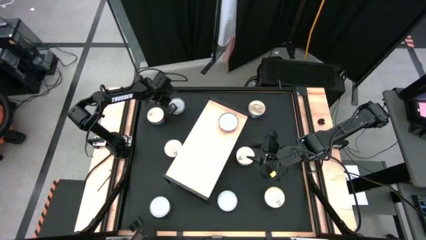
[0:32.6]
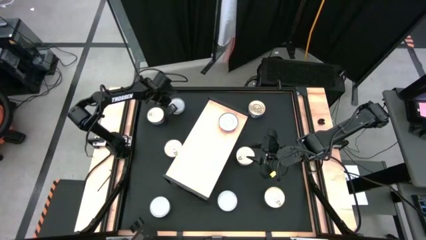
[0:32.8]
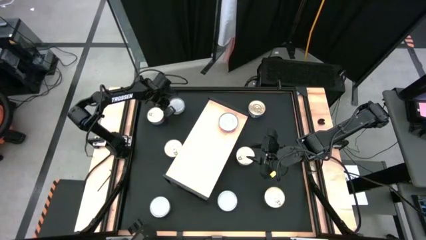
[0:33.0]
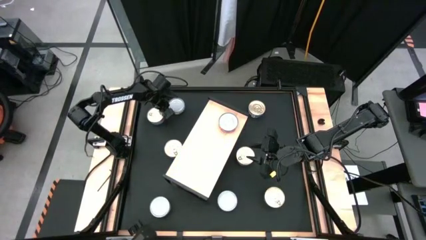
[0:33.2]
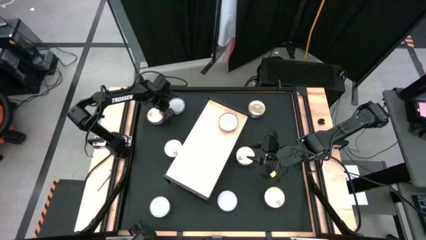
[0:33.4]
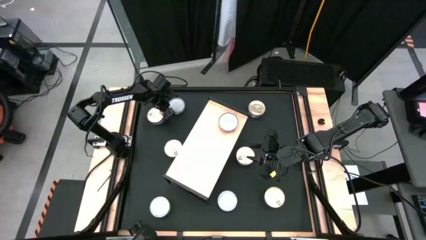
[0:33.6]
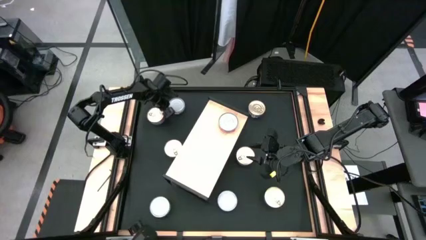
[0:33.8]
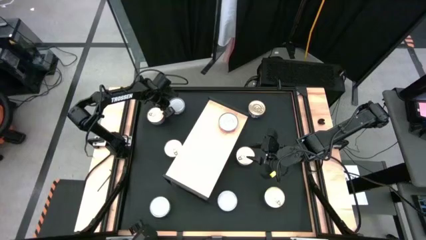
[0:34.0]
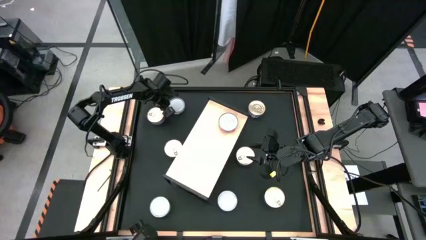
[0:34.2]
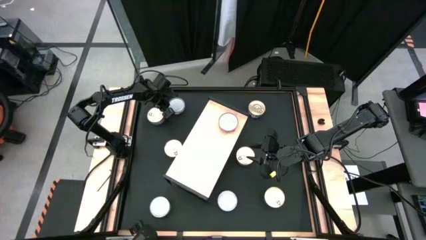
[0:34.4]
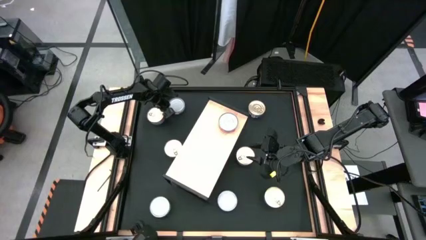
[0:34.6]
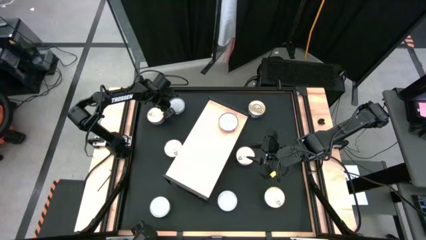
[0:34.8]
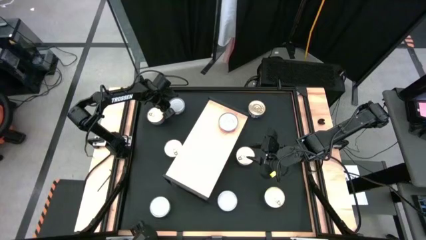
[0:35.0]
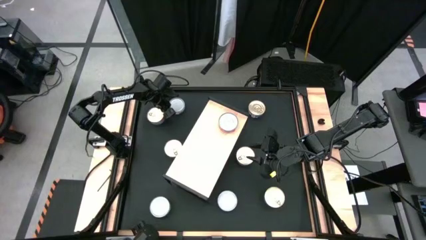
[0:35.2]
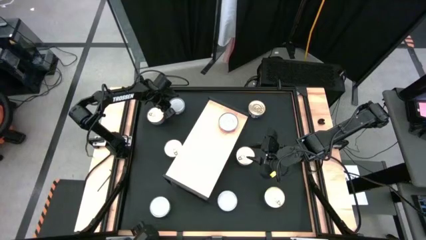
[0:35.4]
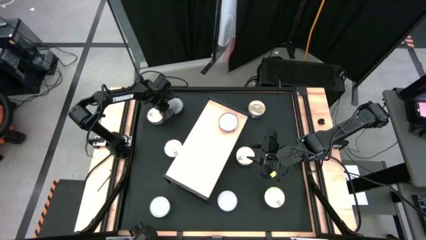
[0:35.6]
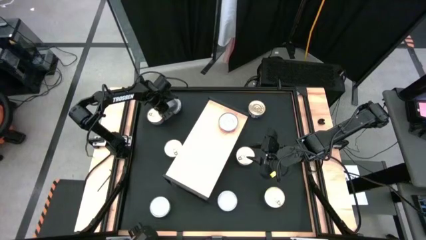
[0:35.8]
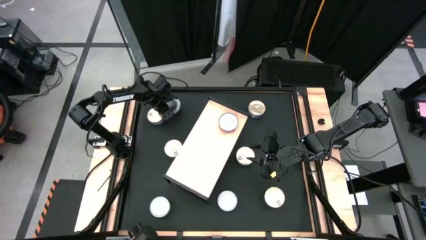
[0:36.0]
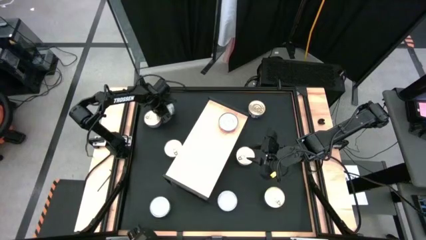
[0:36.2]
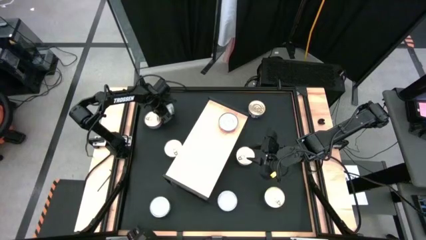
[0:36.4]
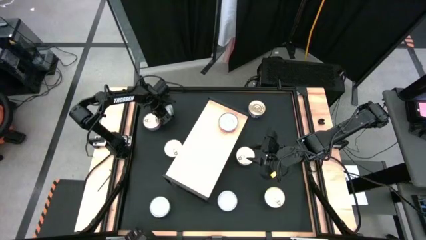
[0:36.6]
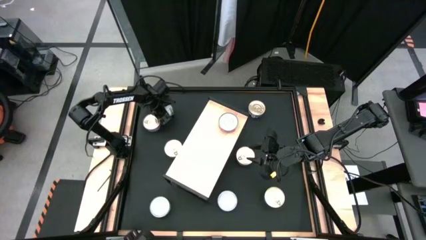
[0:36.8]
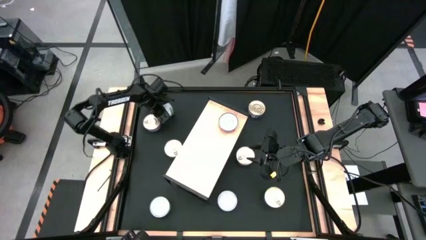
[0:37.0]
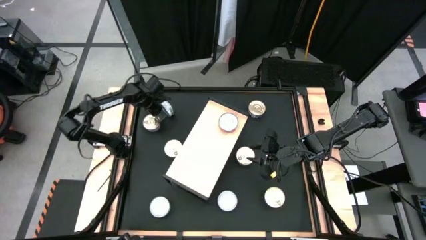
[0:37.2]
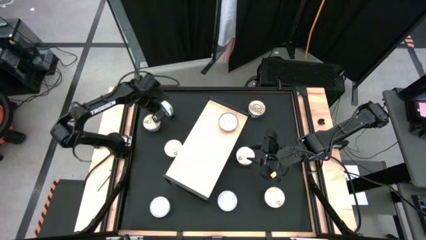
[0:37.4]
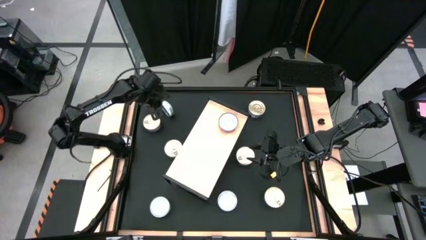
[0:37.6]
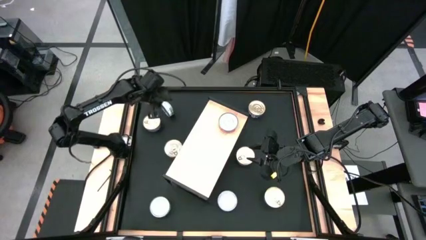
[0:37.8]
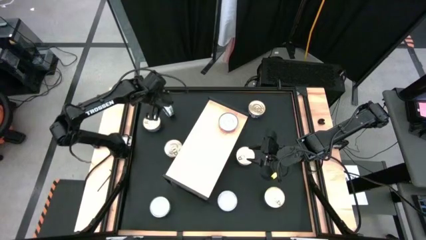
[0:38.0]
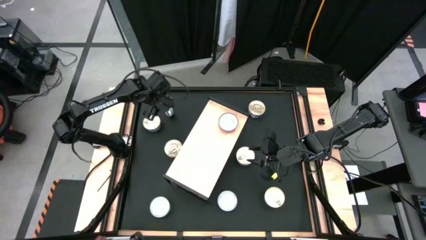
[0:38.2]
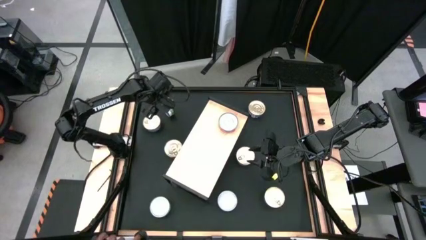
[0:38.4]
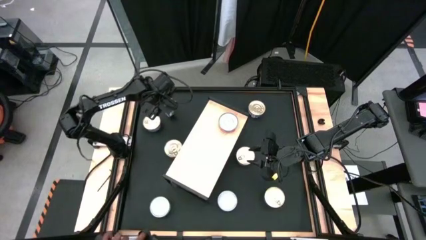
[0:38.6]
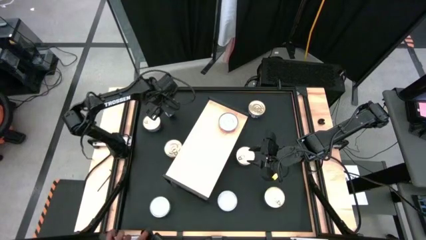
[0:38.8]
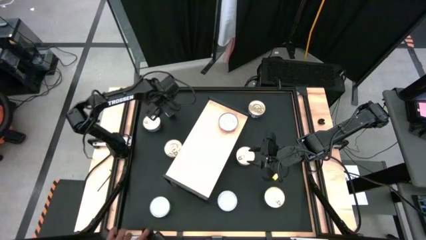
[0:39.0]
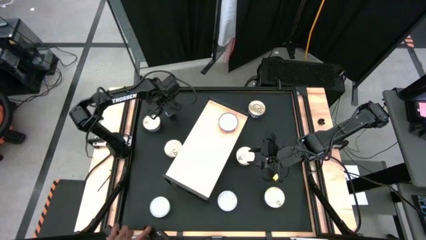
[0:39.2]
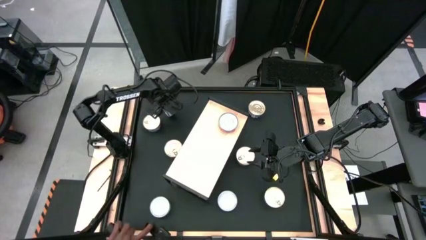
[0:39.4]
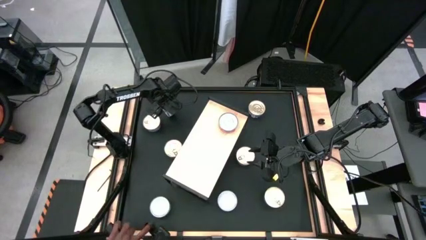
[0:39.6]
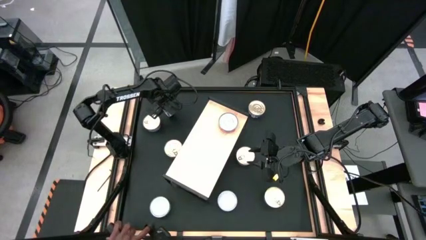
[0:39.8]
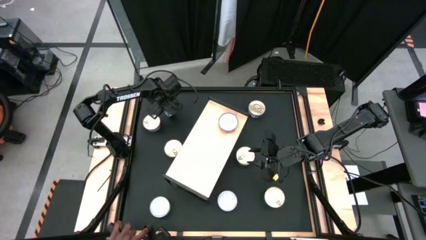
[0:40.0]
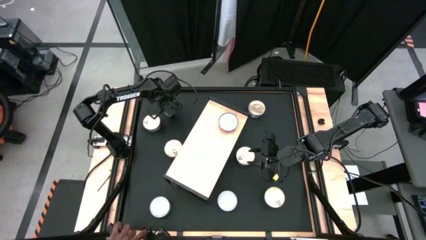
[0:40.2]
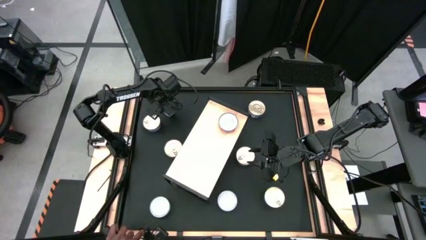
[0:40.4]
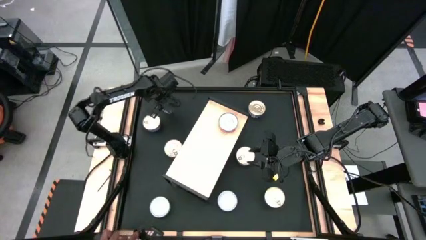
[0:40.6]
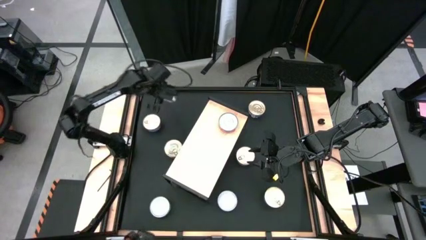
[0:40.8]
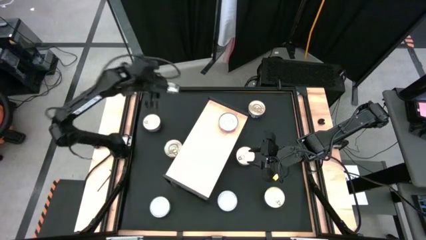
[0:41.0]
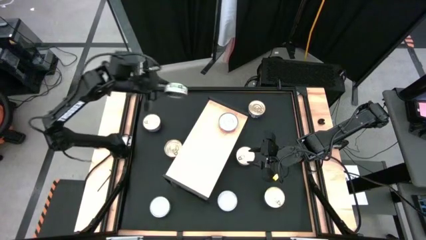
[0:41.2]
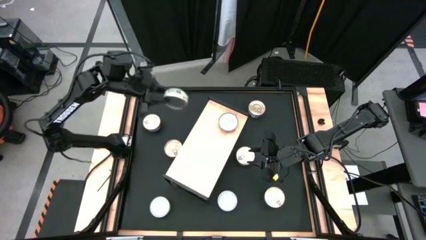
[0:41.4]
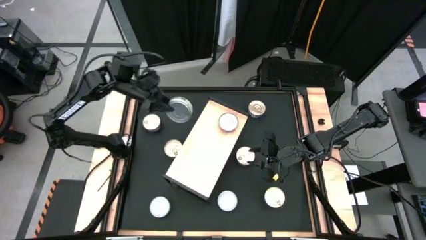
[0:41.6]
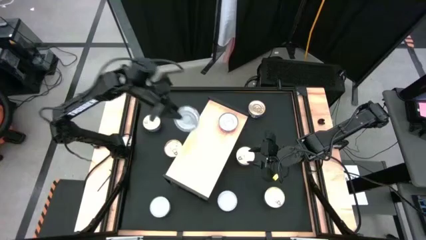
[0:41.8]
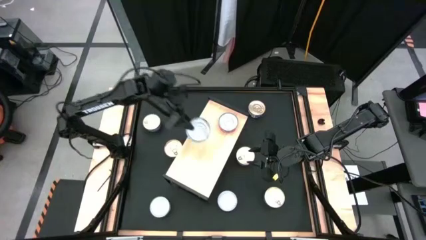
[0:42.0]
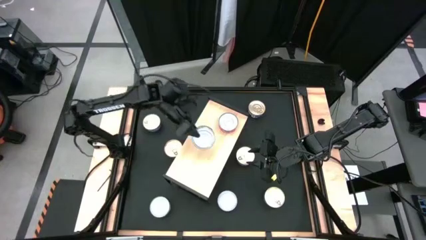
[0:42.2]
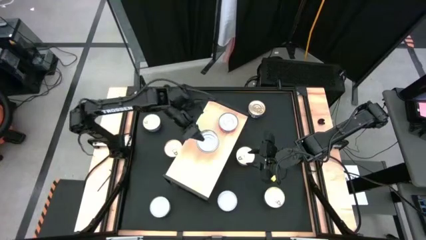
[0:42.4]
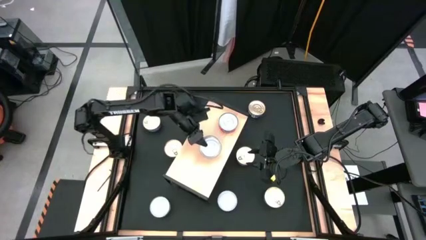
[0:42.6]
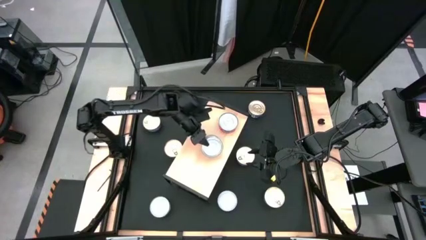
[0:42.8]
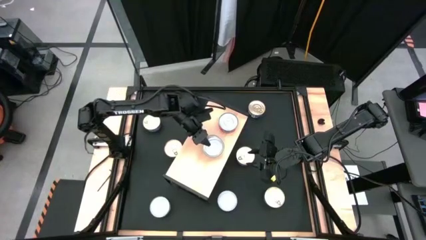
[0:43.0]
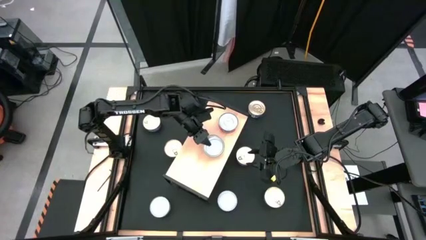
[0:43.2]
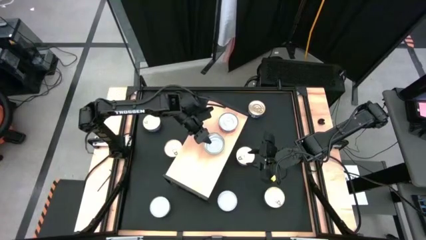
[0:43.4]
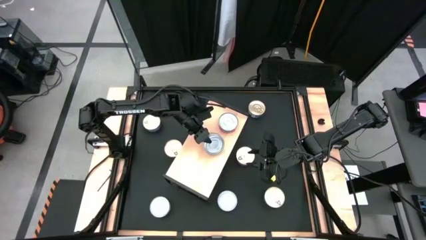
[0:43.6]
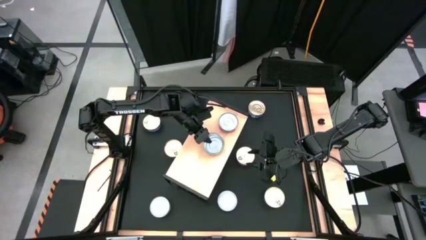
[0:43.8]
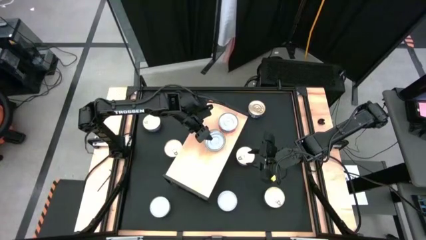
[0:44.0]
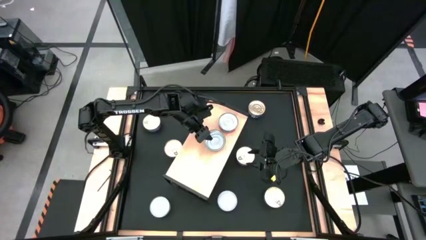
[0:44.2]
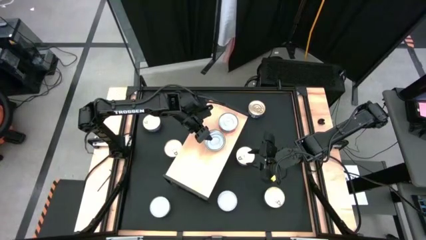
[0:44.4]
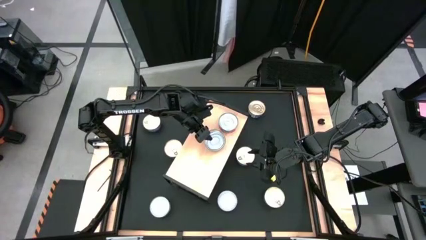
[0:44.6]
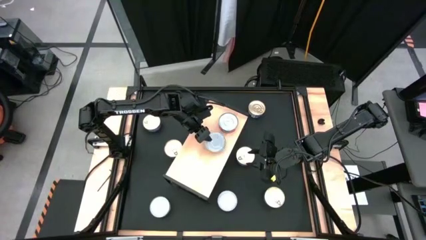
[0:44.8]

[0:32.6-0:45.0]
Task: Stack canned seafood by type on shelf
Put the green tuna can on the shelf
